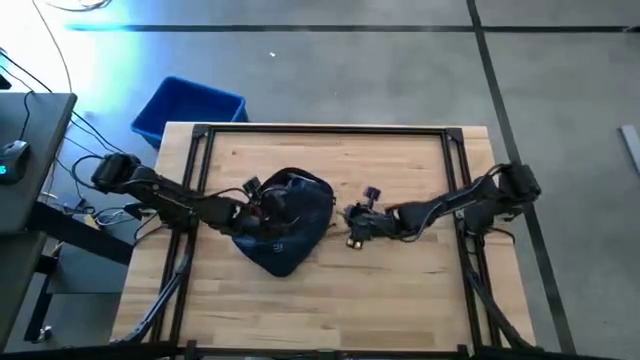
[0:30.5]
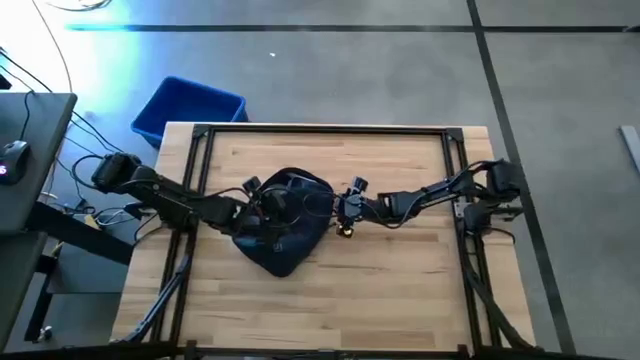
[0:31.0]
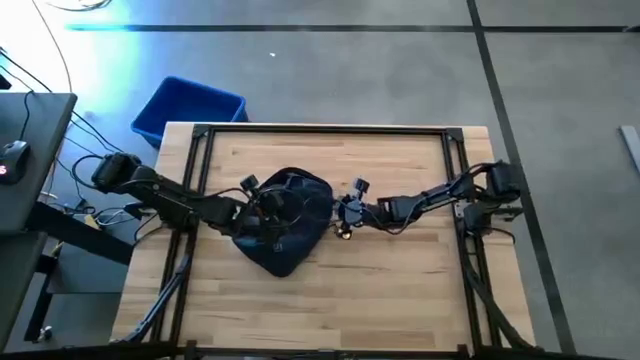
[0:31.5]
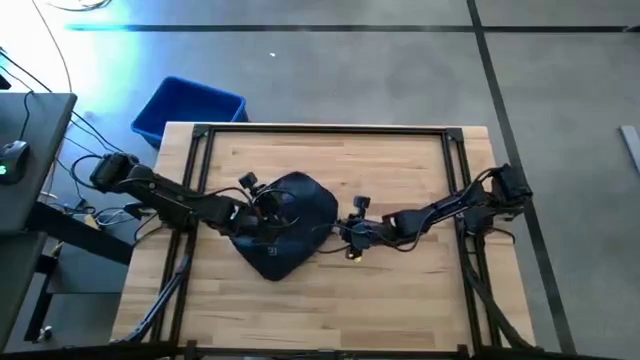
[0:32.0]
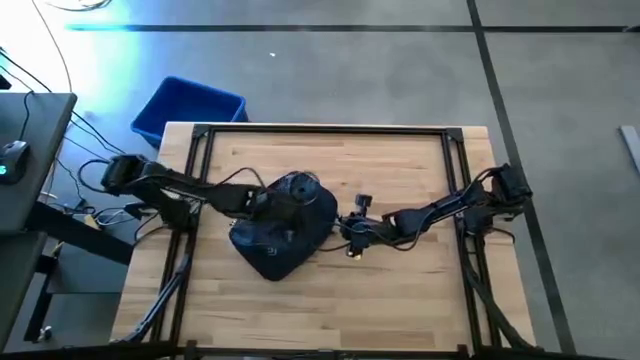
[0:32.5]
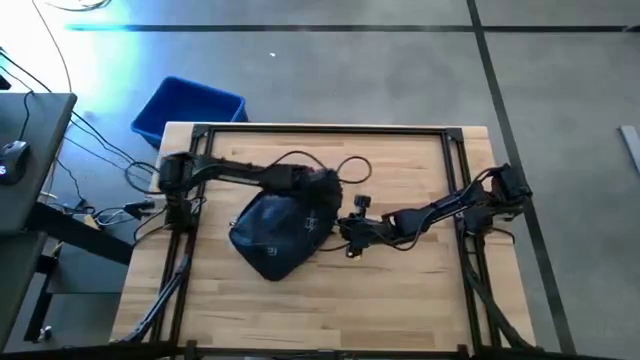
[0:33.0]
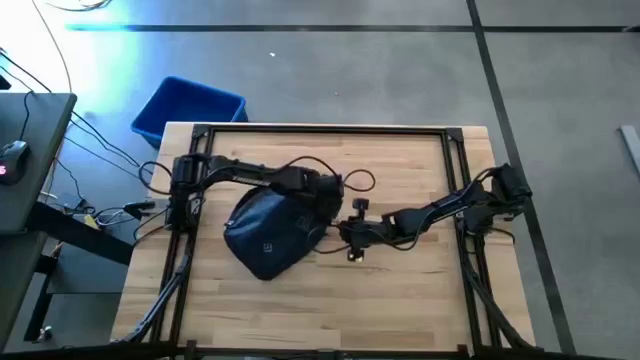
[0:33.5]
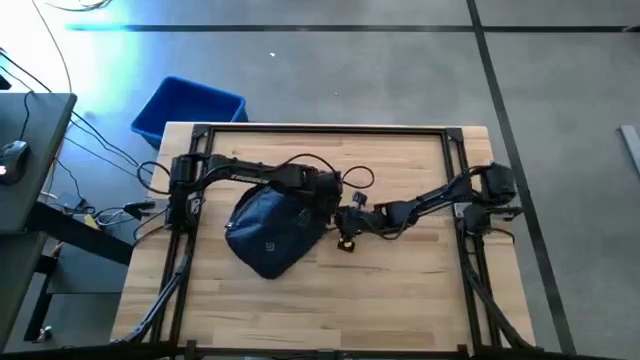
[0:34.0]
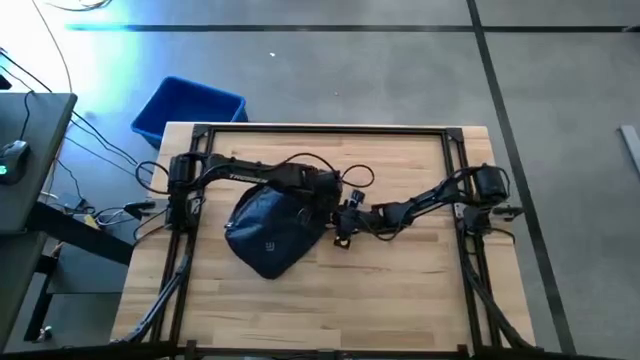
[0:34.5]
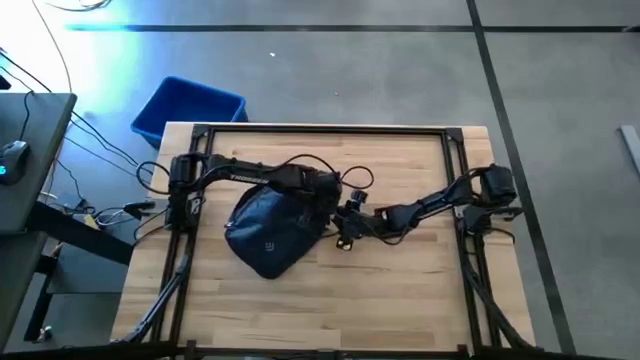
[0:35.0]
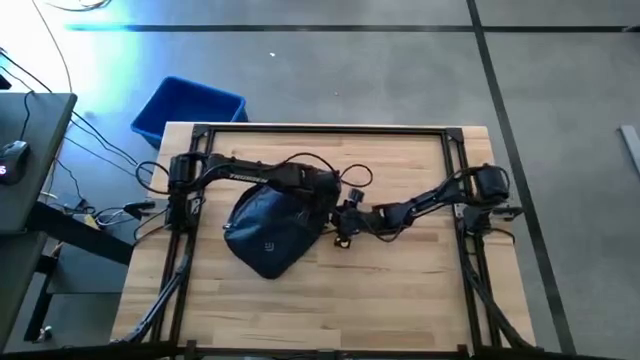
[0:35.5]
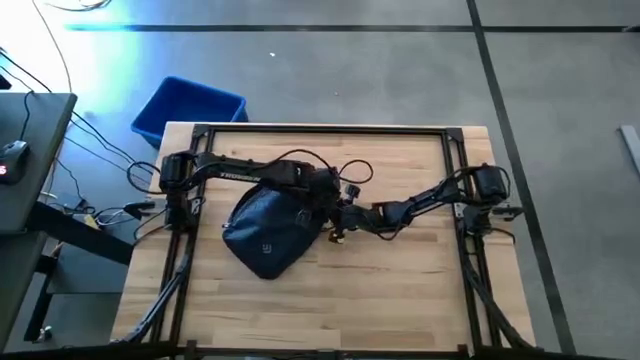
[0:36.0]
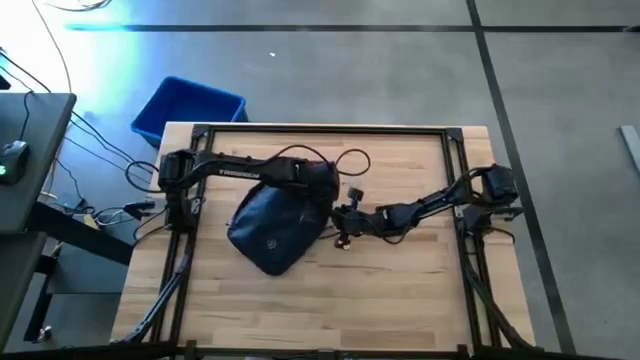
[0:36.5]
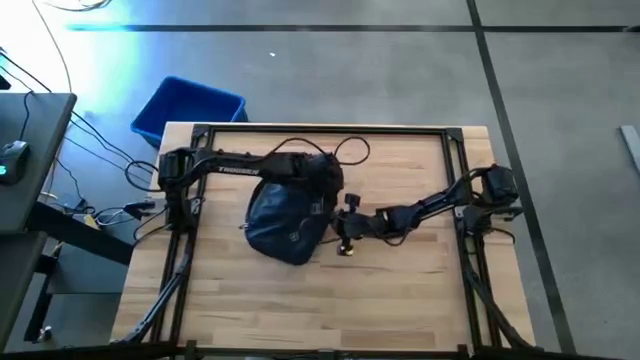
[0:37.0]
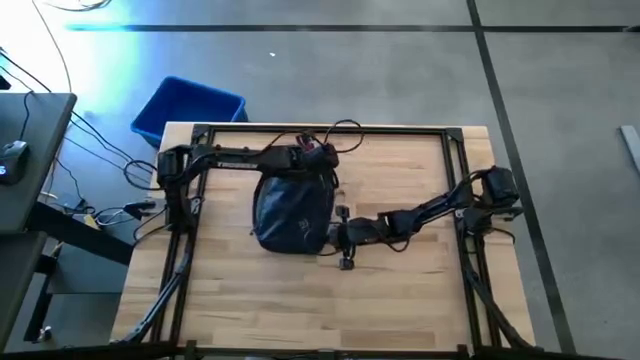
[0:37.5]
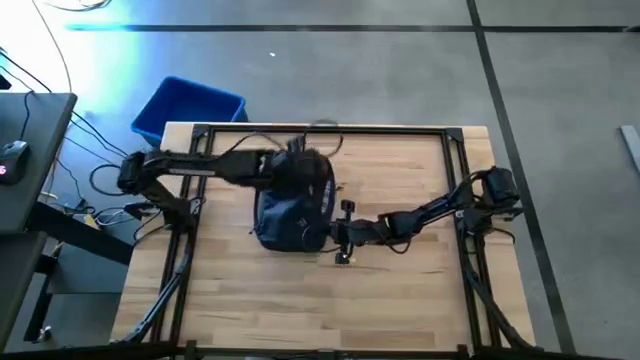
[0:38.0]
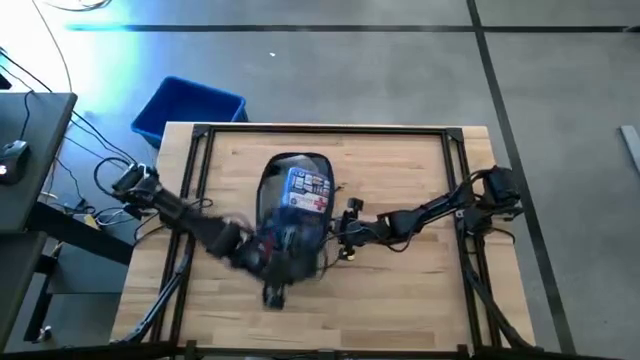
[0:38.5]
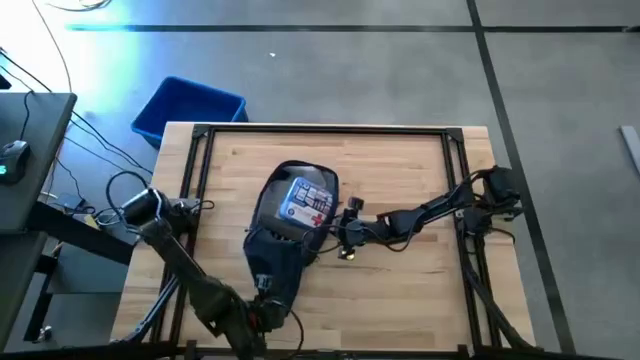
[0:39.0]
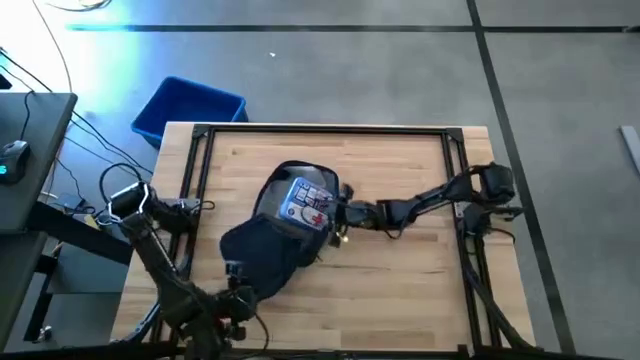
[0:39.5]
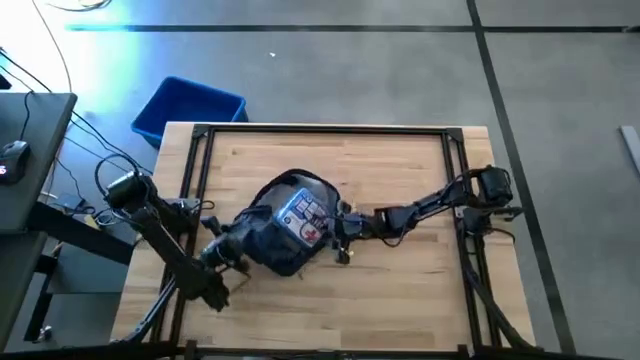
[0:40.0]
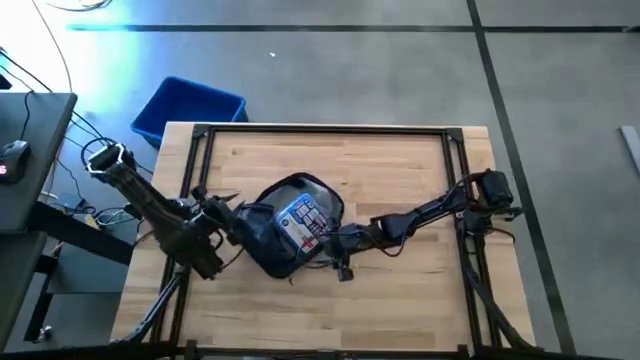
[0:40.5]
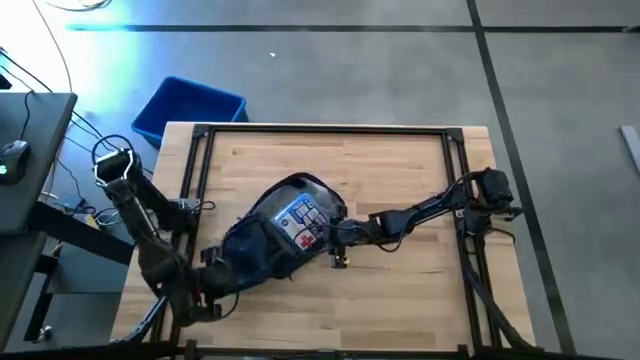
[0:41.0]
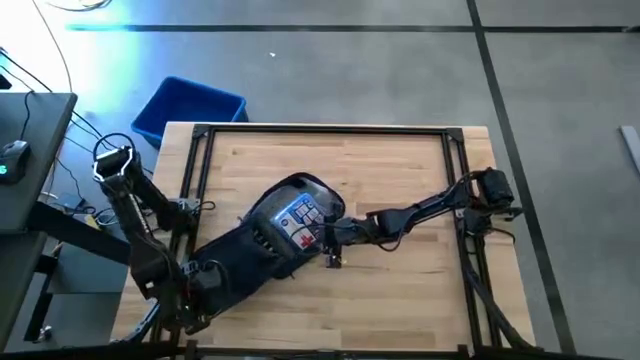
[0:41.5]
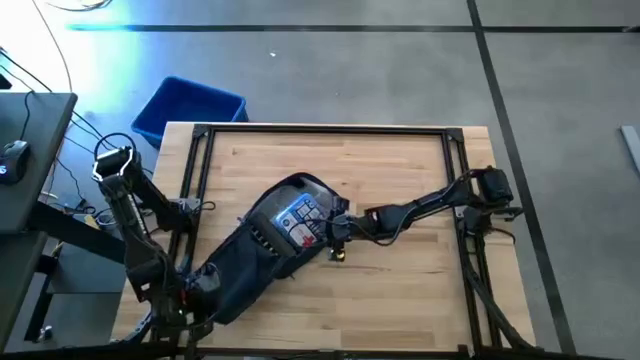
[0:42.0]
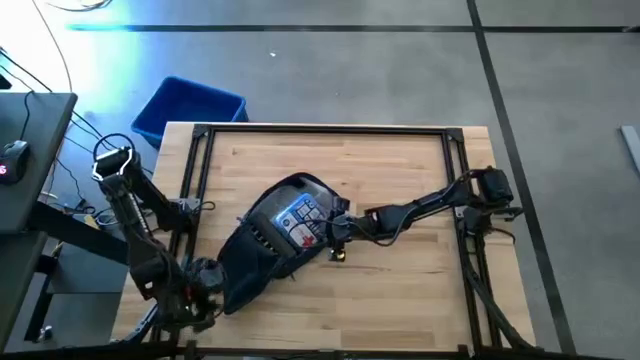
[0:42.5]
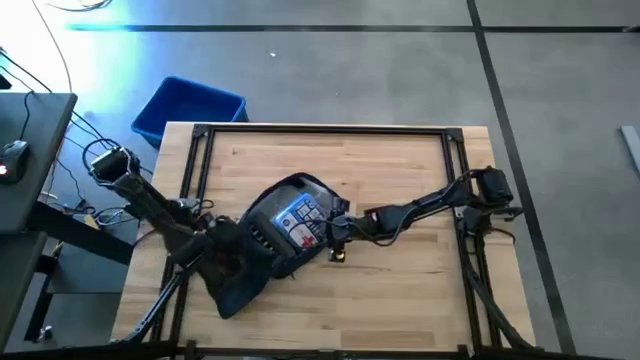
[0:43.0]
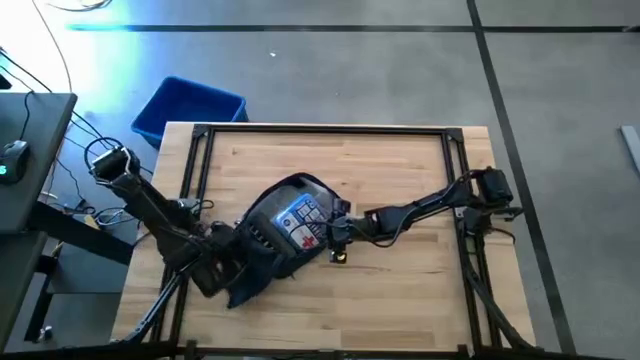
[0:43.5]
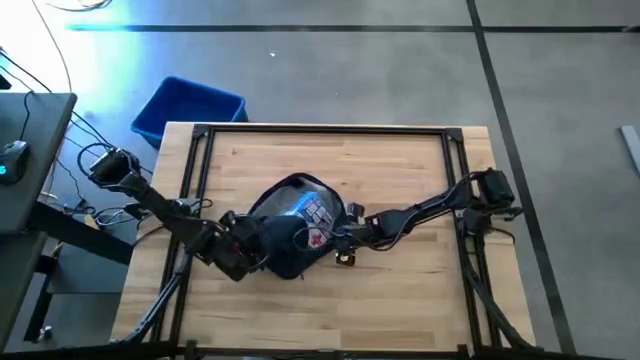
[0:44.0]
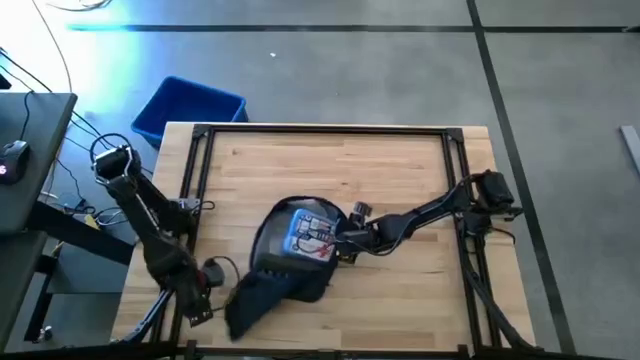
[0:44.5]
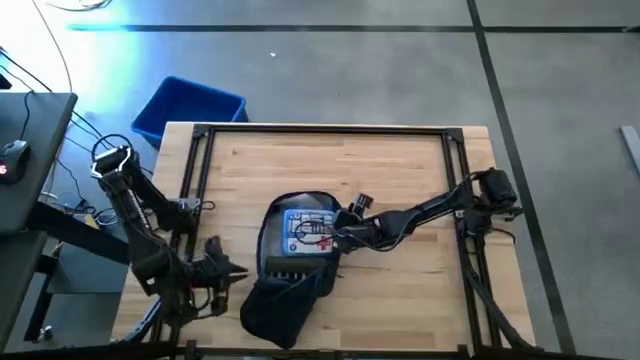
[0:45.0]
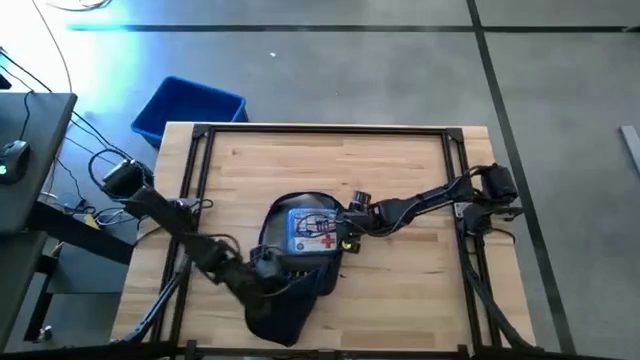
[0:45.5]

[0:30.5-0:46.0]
Task: Unpack backpack
Open the backpack

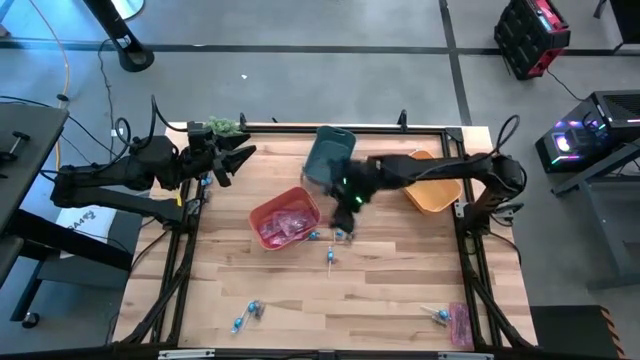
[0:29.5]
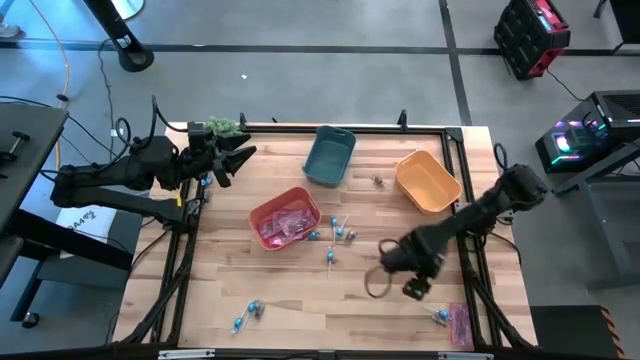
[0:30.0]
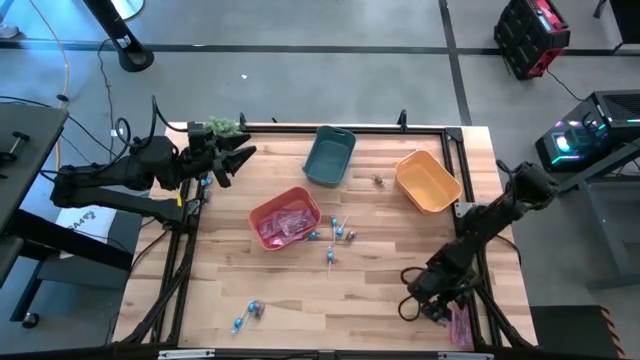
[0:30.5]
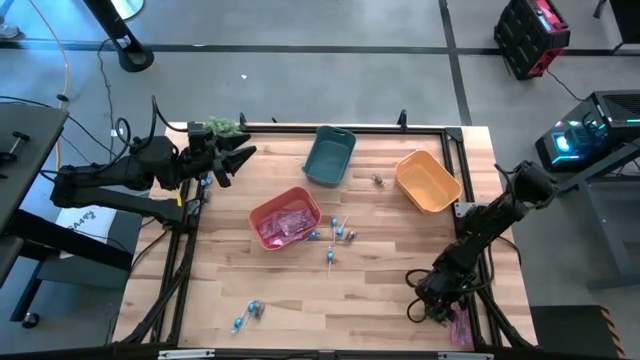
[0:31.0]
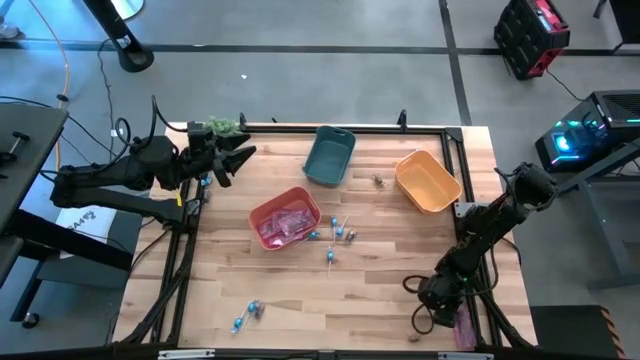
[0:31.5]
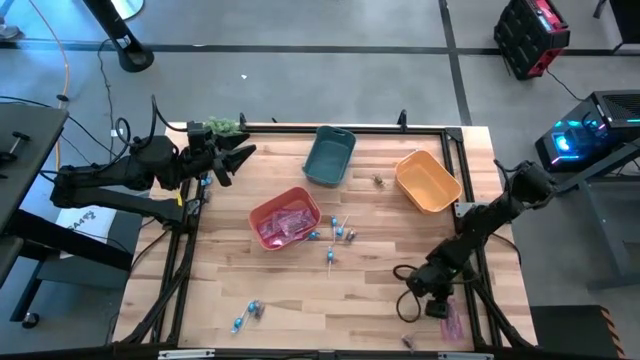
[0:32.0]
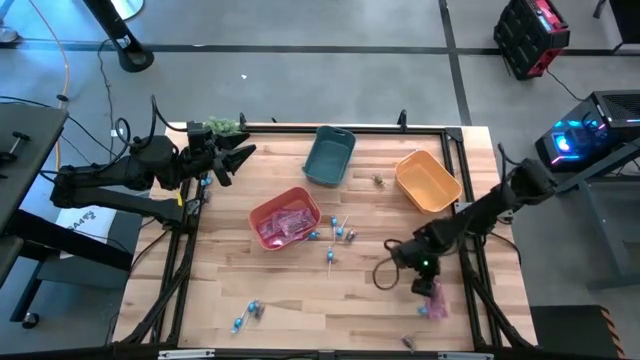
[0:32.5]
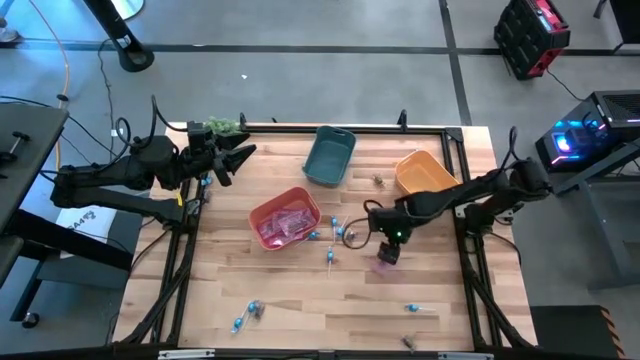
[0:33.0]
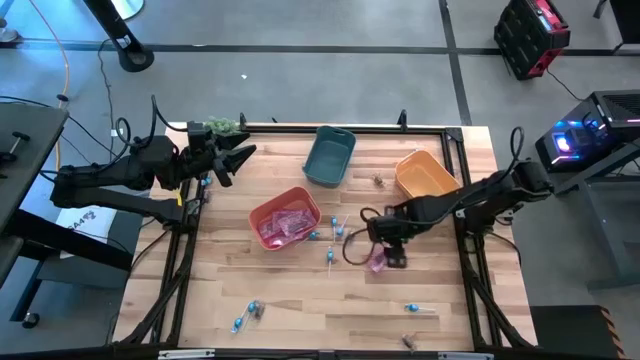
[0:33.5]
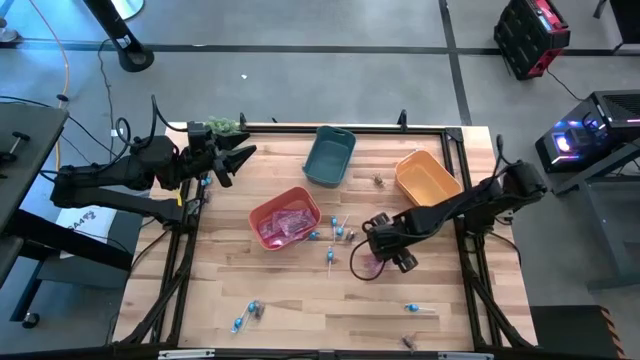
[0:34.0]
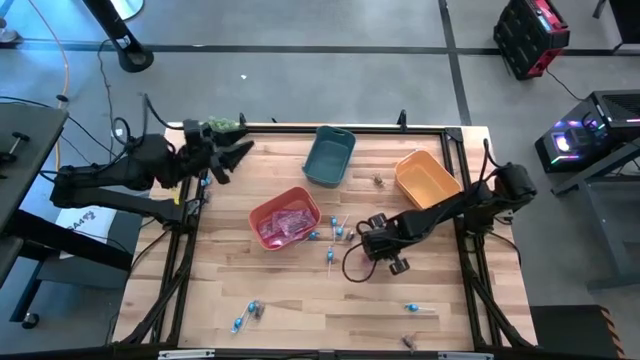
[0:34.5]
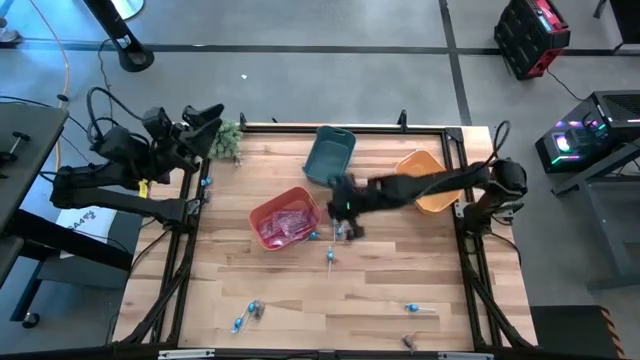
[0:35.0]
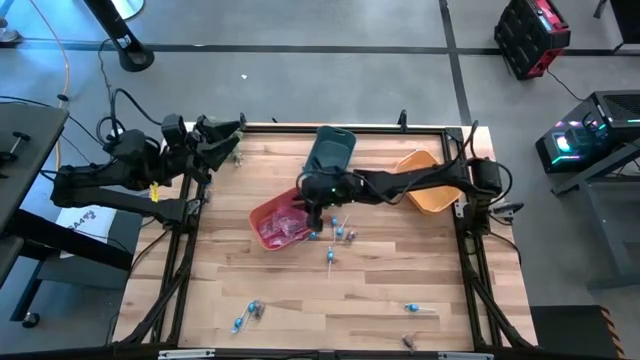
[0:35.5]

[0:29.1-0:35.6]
Task: Sort candy
Put the red candy into the orange bin
